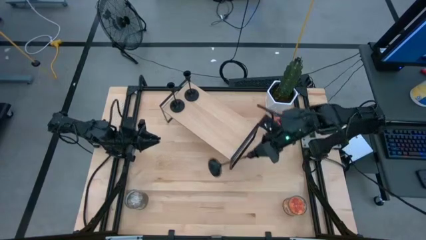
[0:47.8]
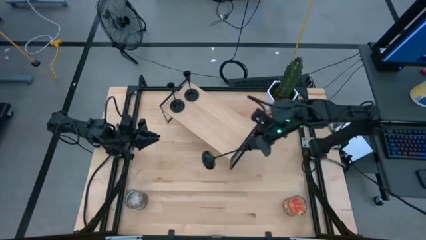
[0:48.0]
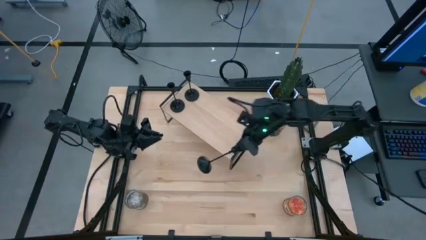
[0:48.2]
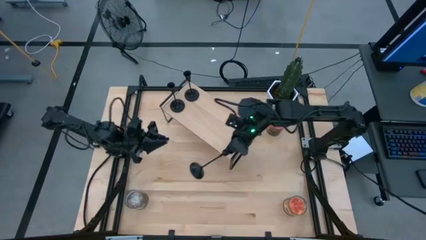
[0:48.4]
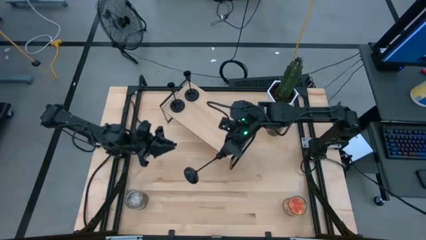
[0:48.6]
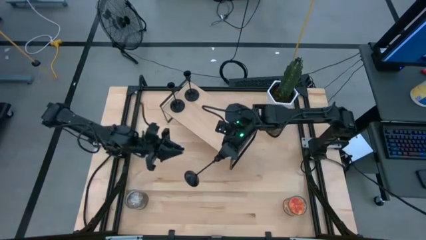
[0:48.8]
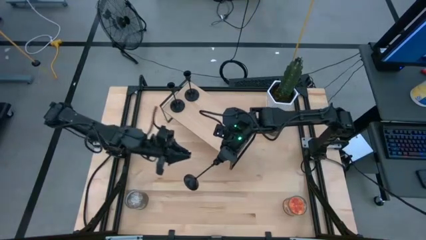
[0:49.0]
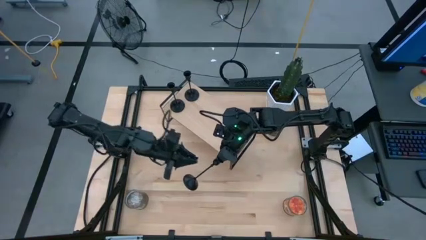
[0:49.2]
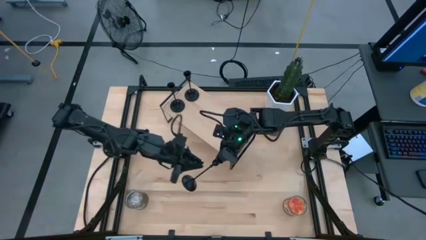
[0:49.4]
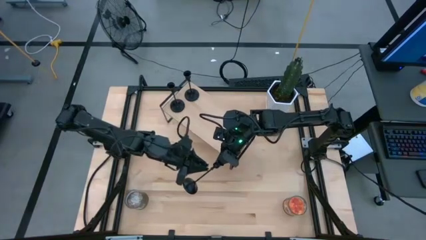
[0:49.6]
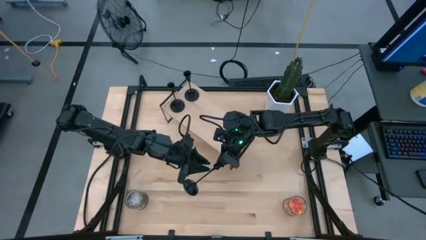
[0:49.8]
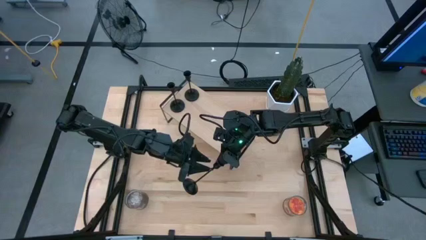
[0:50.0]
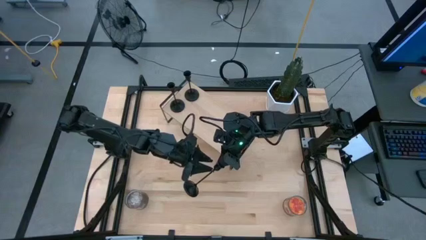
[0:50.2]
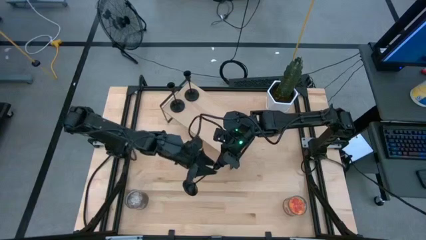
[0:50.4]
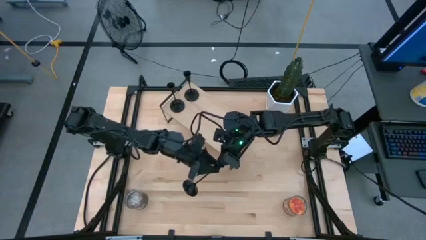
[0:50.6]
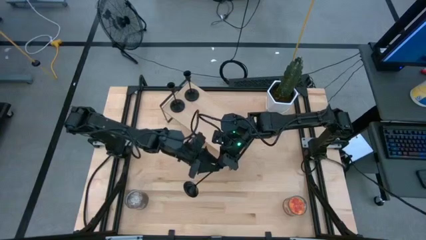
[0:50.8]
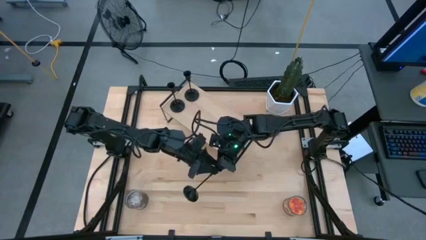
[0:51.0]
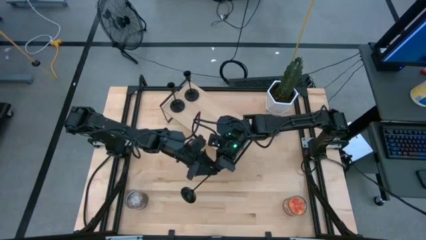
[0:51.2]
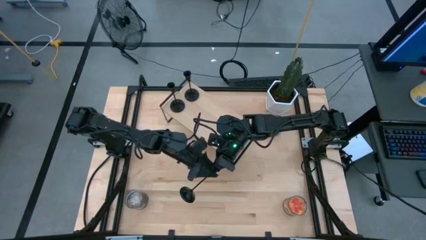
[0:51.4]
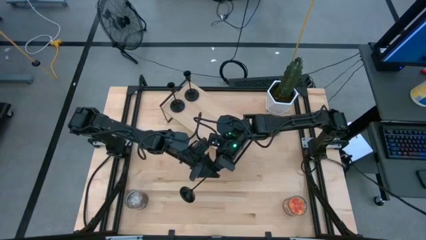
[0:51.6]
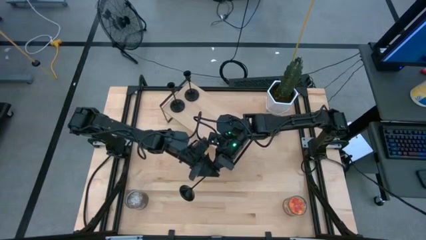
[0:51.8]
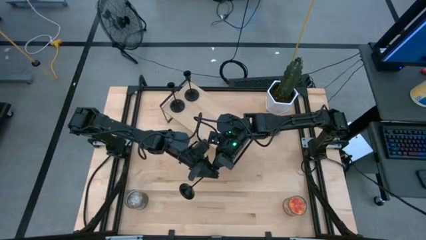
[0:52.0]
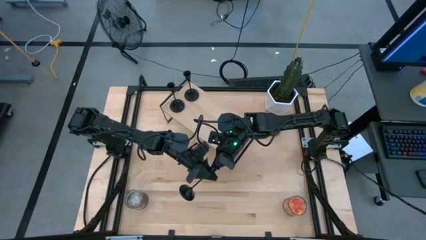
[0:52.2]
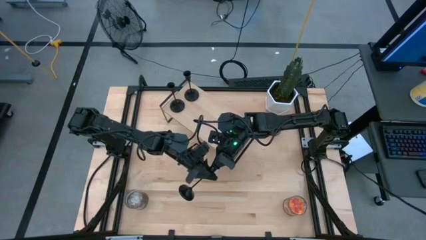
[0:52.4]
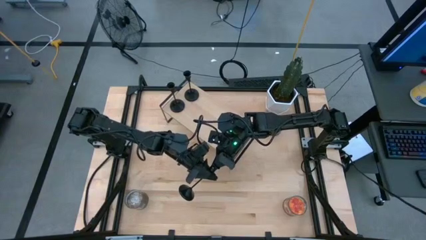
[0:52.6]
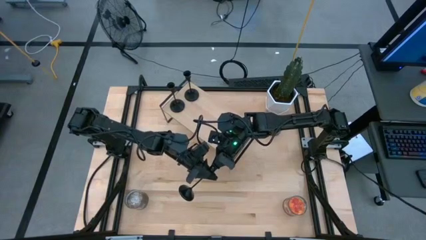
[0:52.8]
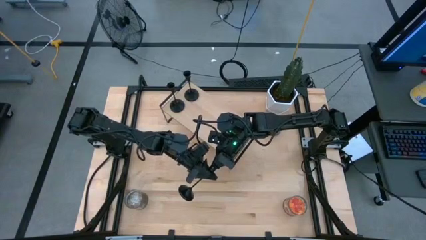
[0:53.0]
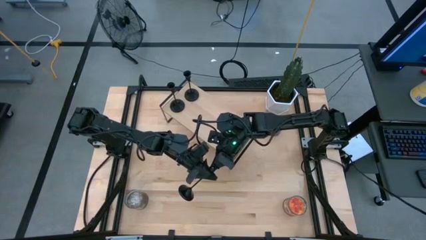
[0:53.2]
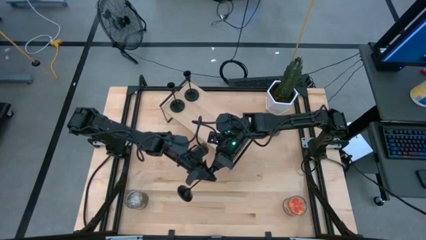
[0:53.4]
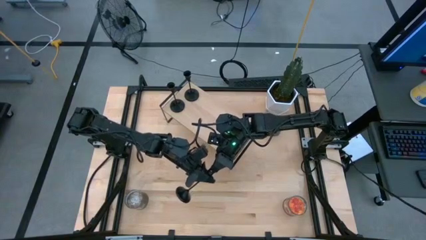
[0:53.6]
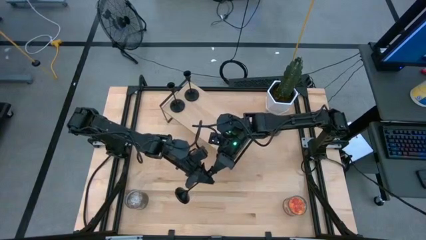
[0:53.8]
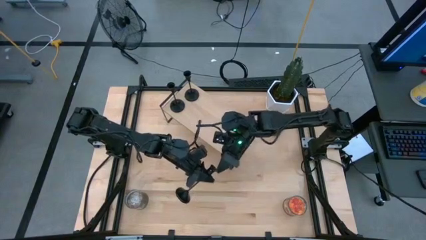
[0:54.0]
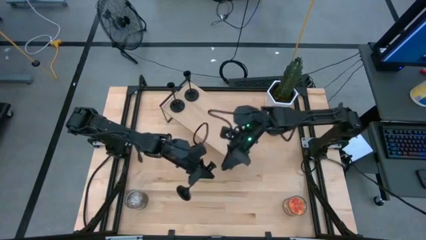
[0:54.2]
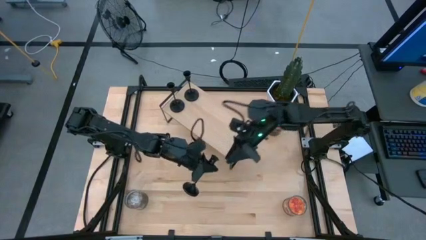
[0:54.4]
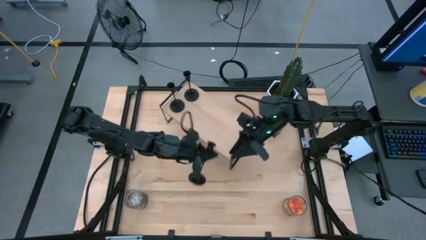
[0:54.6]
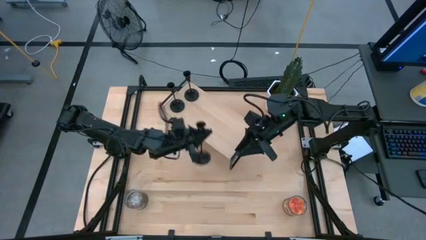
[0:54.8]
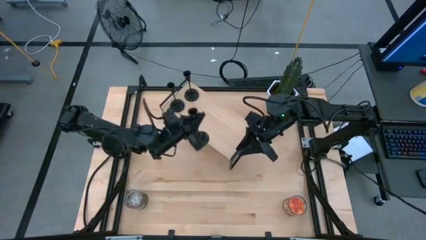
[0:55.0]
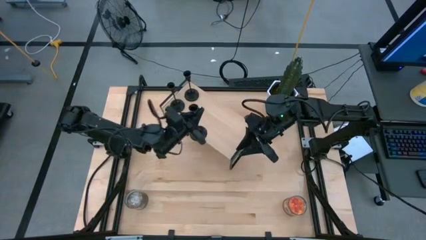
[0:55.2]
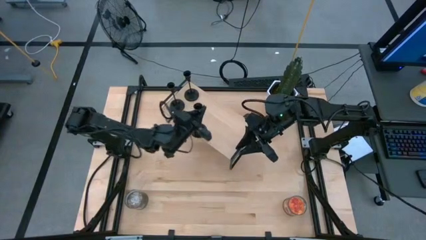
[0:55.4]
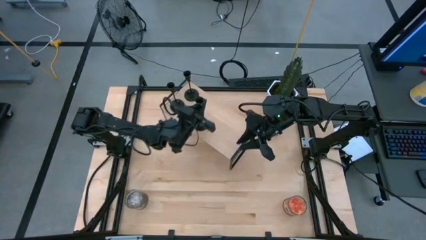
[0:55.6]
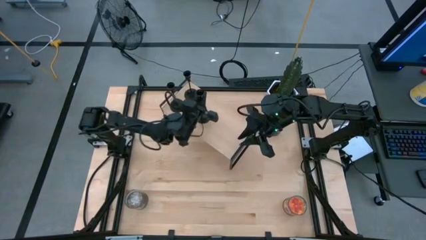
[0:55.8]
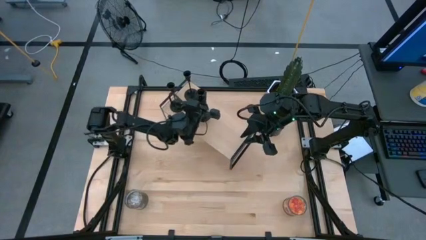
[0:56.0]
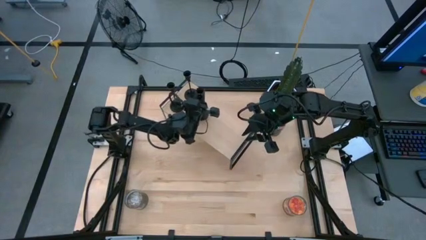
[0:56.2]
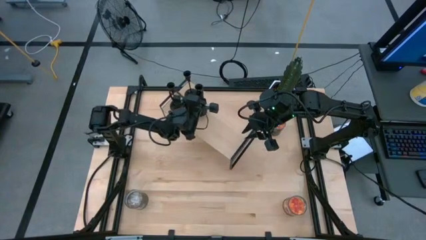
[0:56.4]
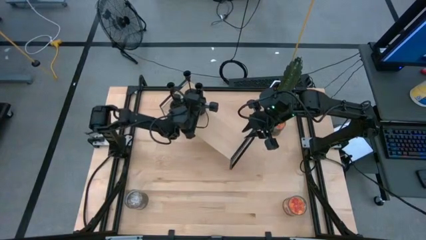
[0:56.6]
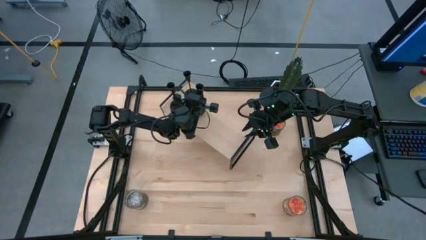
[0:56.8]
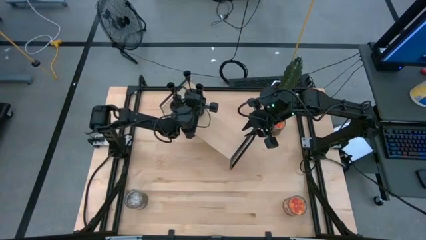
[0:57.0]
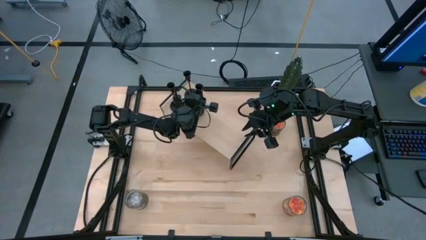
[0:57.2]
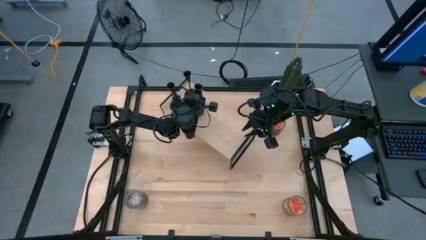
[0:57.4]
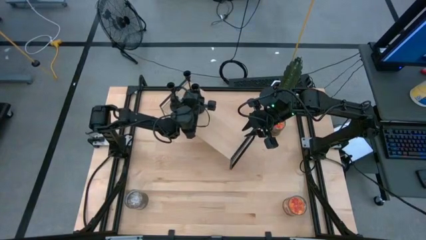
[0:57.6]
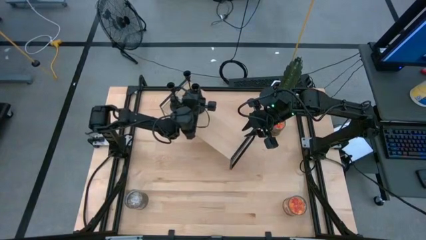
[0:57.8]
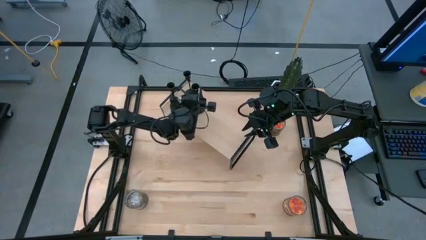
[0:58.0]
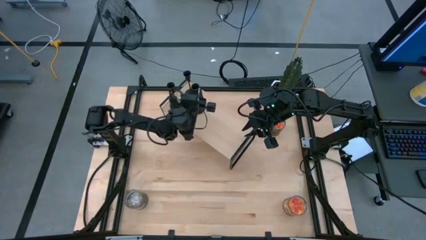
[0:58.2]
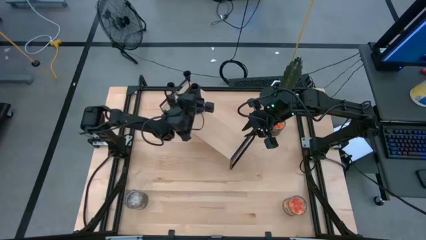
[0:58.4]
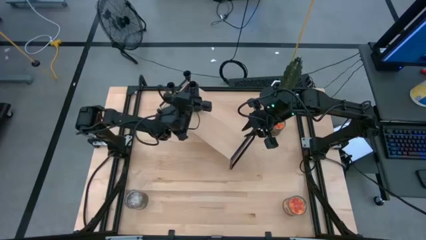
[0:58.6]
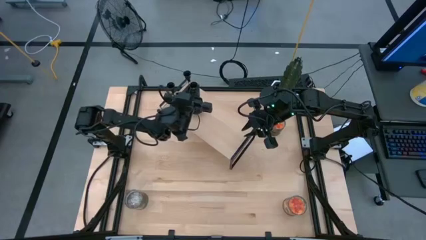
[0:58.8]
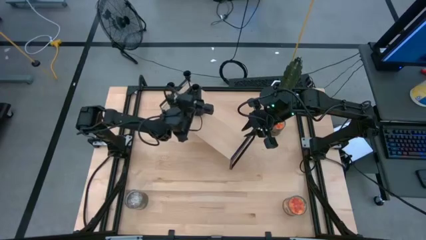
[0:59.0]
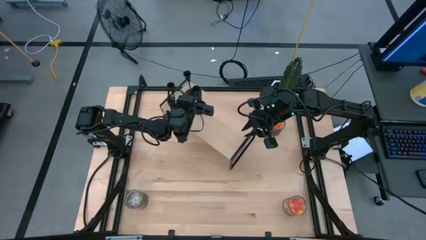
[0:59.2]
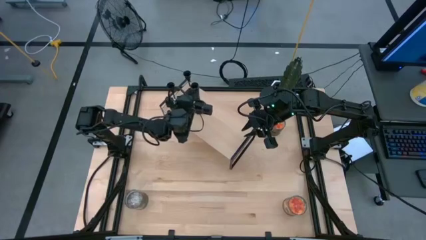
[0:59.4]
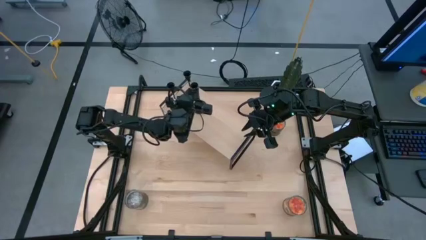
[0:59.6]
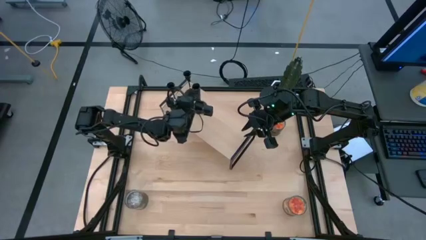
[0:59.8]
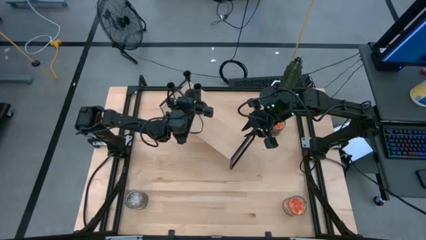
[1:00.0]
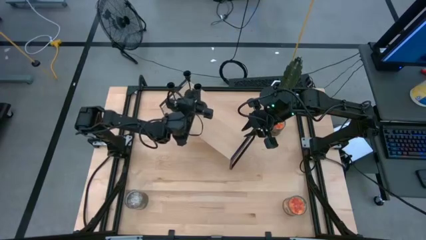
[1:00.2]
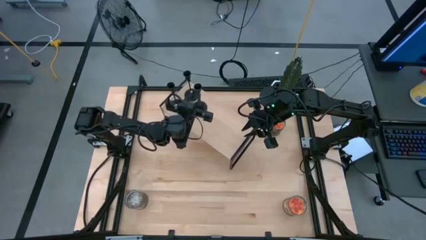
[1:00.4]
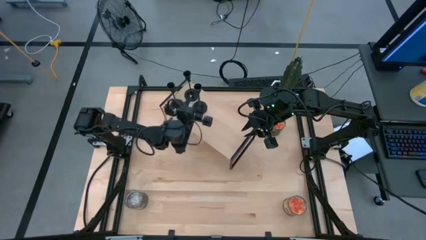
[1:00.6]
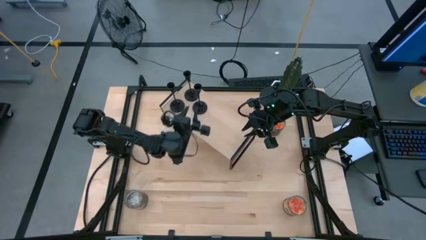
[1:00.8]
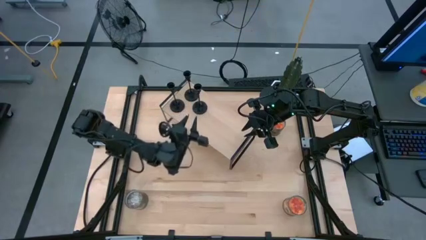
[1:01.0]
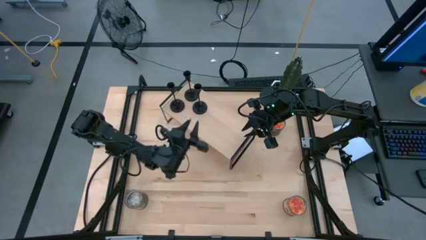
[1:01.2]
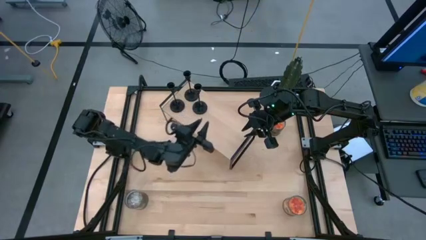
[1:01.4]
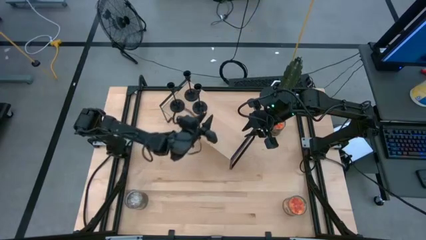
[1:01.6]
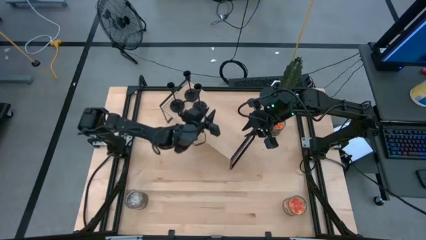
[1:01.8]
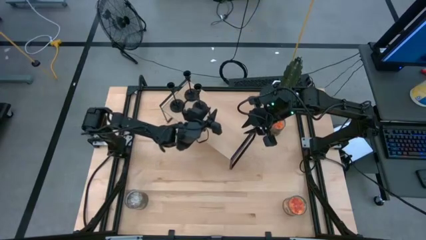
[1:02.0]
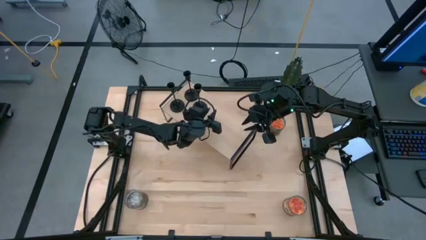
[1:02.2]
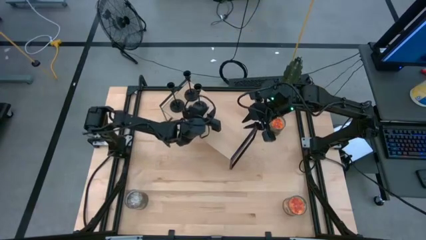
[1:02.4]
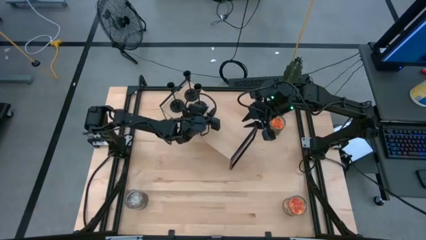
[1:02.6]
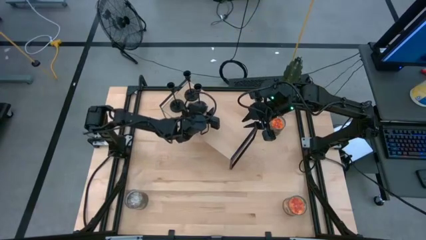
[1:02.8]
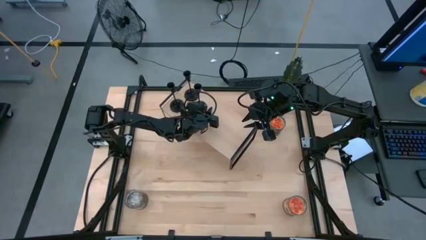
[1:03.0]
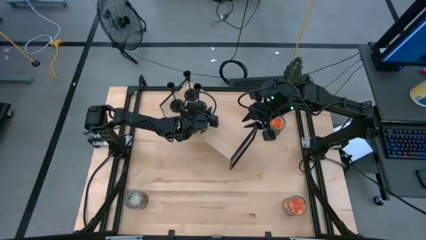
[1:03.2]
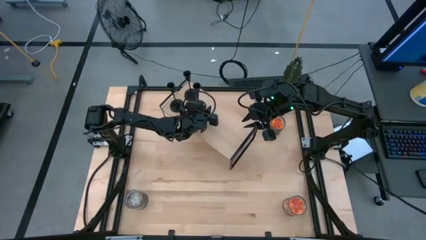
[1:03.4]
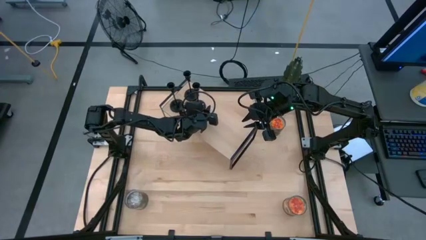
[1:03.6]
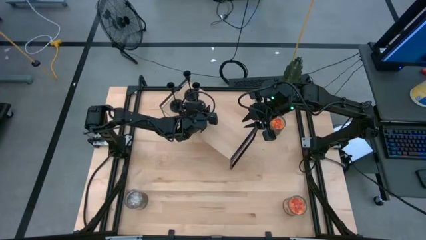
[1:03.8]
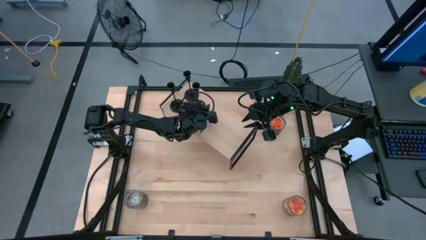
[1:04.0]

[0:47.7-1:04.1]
Task: Pick & Place candle stick holders
Put the black candle holder on the shelf
